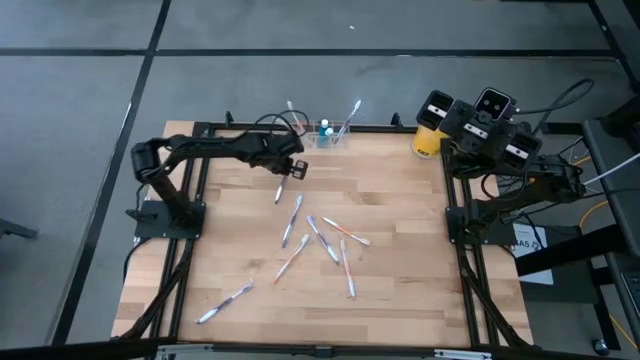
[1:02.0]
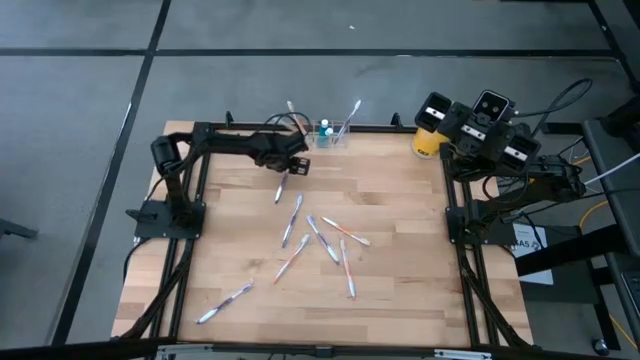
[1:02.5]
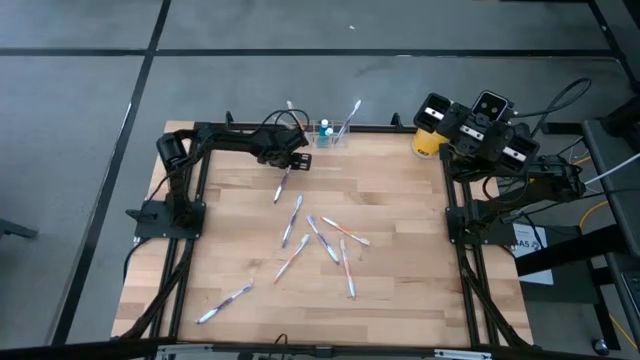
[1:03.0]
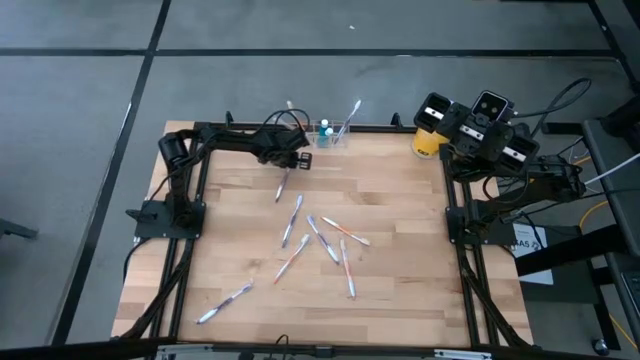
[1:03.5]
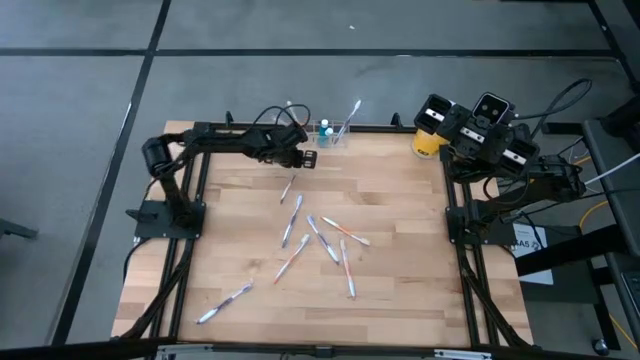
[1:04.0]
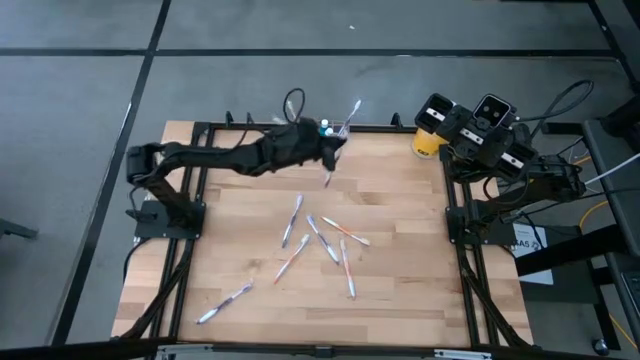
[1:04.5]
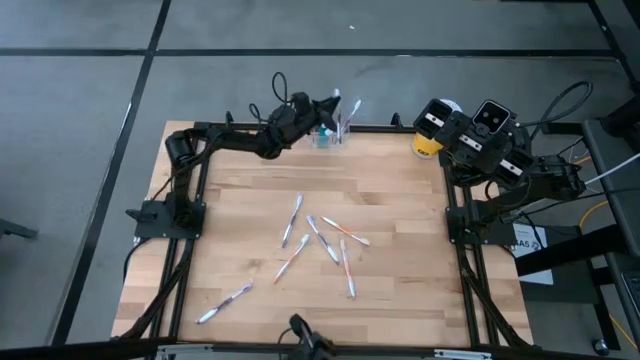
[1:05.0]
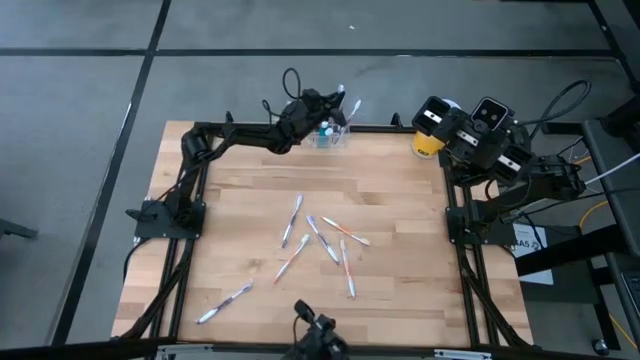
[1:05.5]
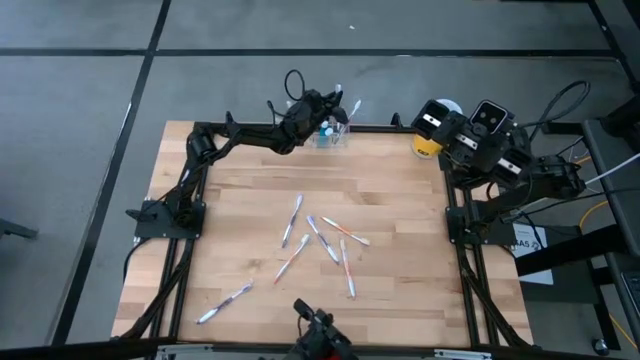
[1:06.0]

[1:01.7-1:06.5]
Task: Pick & Place toothbrushing station
Put the purple toothbrush into the transparent organizer

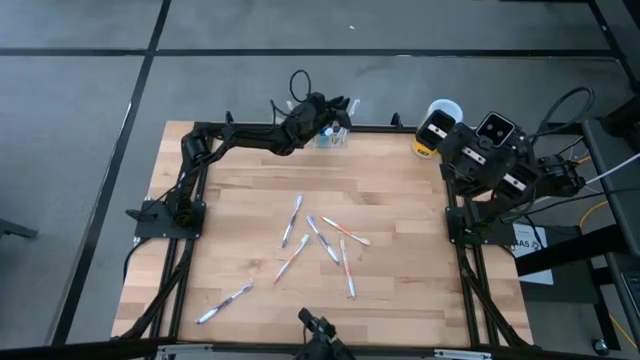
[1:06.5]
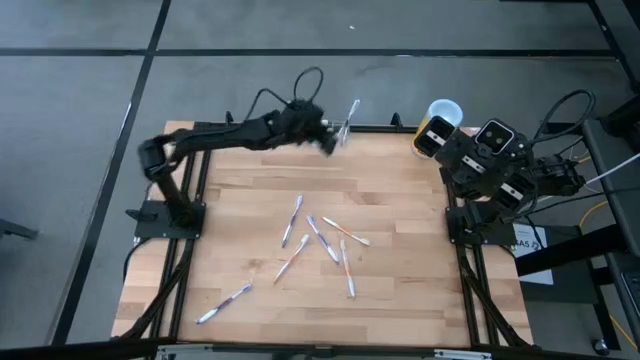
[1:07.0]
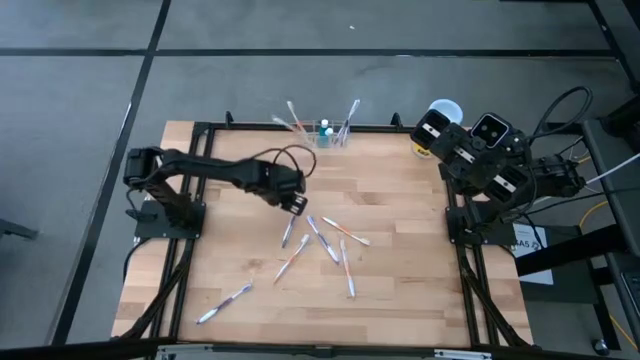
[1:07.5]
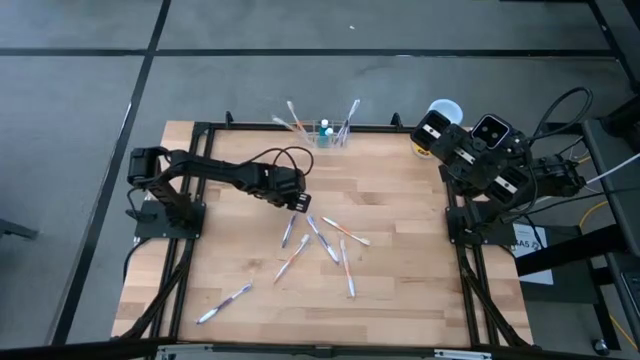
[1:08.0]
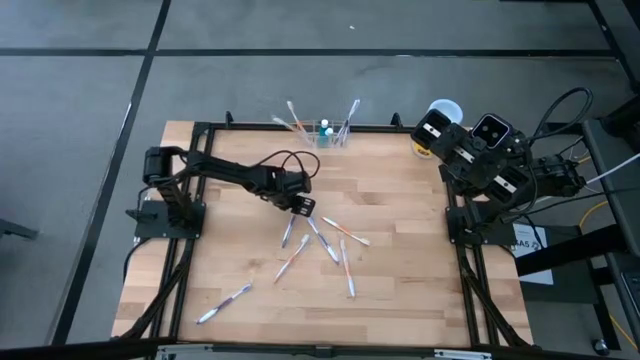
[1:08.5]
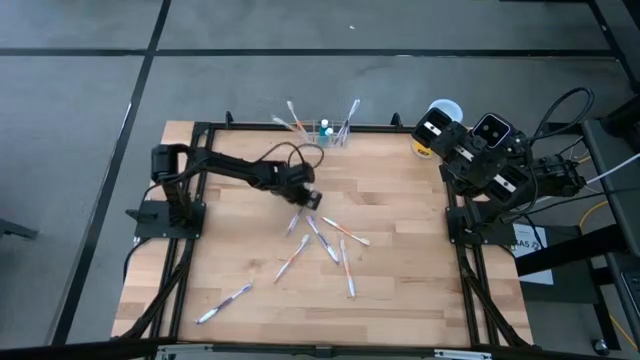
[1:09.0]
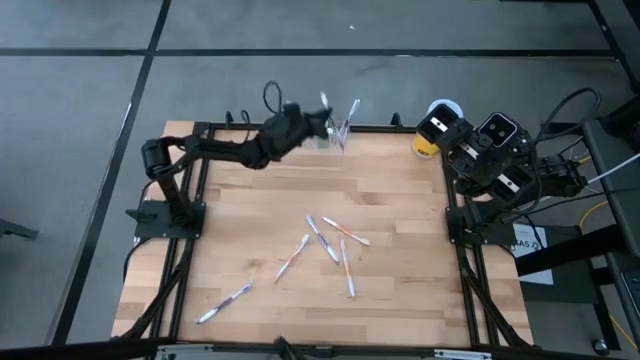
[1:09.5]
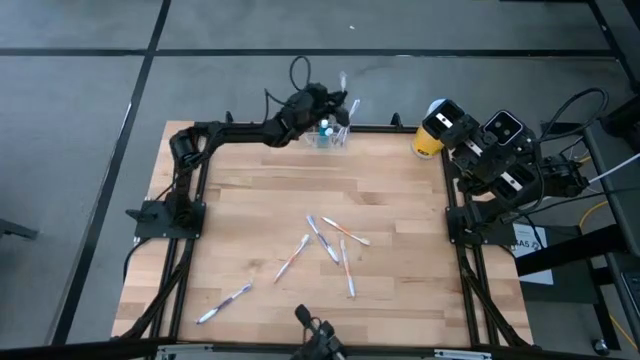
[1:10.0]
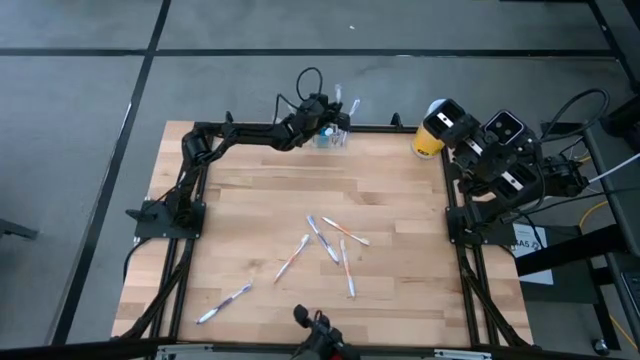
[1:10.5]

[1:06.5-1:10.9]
Put the purple toothbrush into the transparent organizer

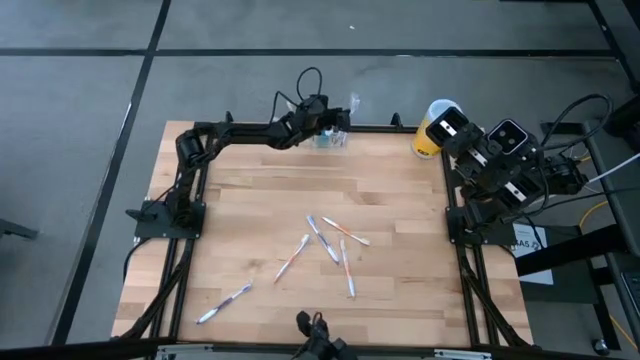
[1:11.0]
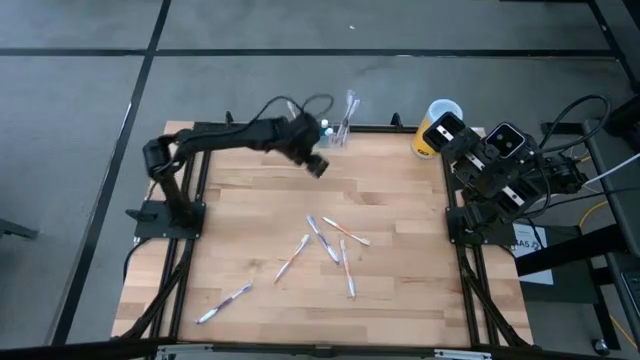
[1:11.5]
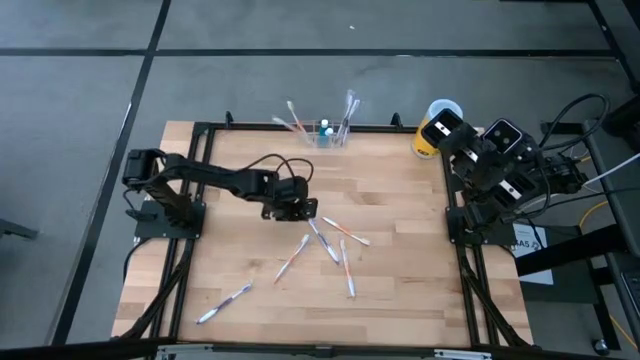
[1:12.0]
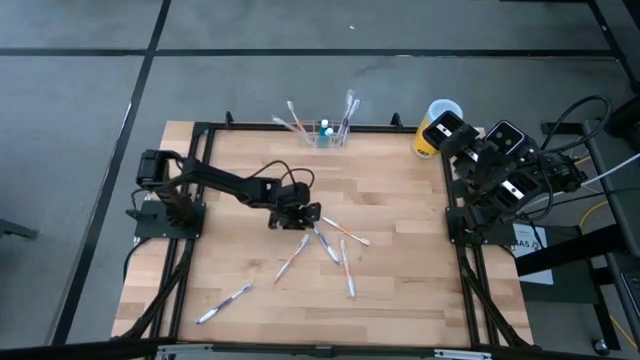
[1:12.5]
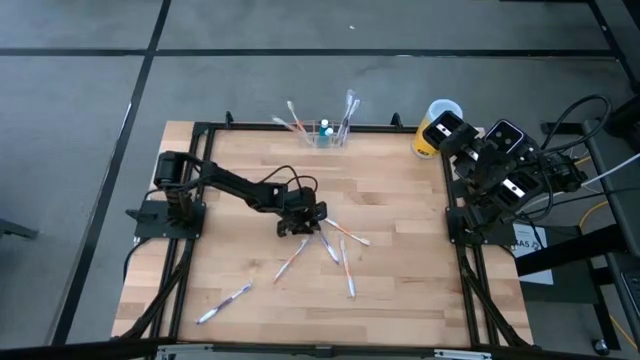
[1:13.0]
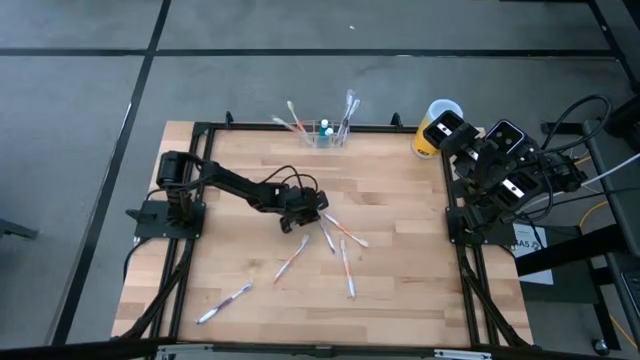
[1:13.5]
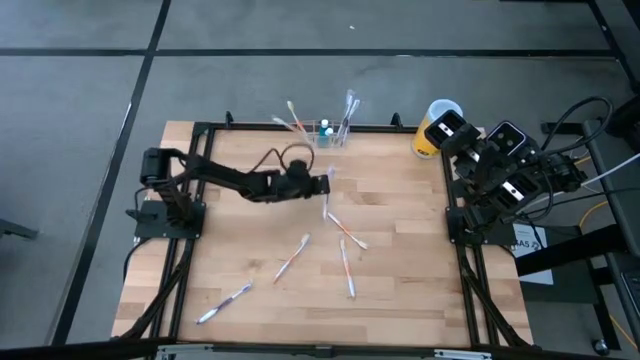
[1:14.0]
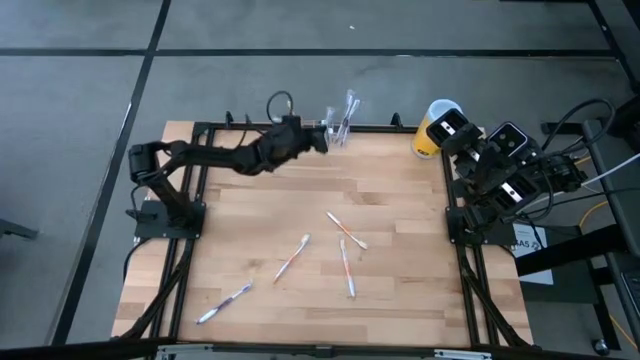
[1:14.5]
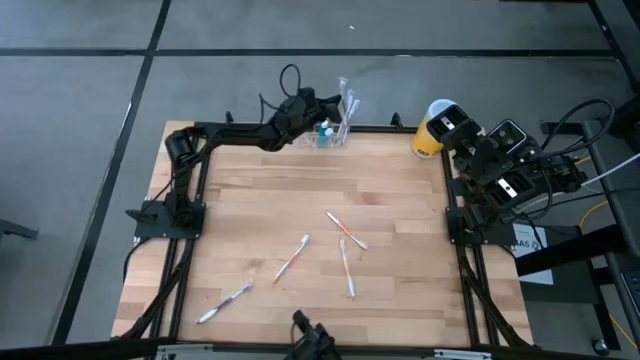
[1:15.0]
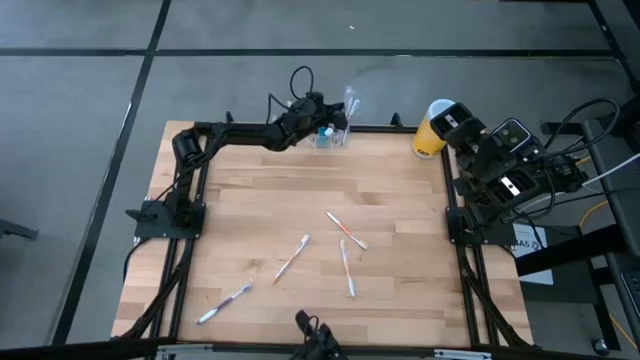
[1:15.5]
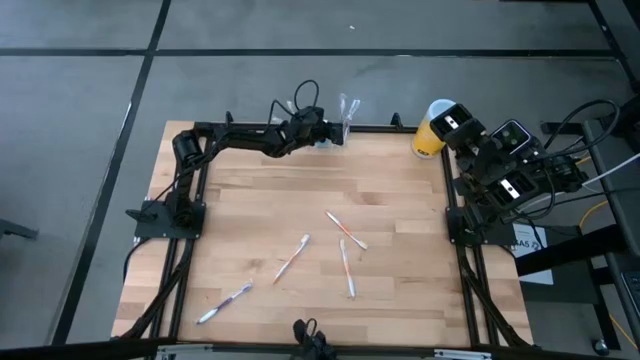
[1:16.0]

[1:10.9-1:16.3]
Put the purple toothbrush into the transparent organizer

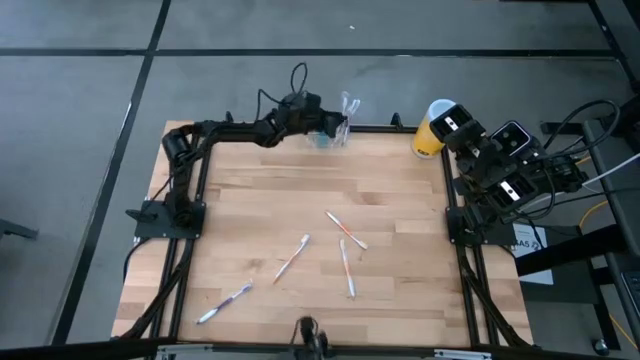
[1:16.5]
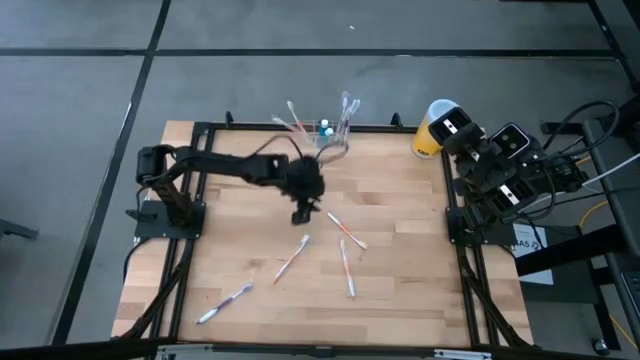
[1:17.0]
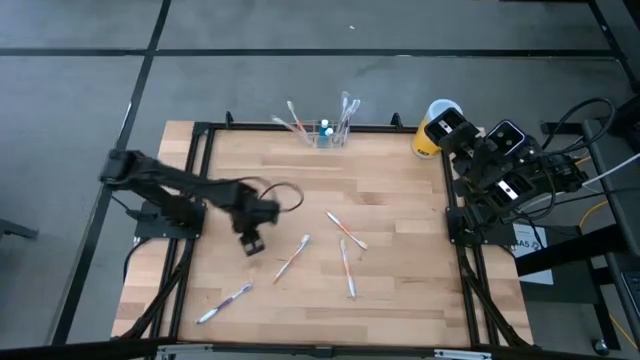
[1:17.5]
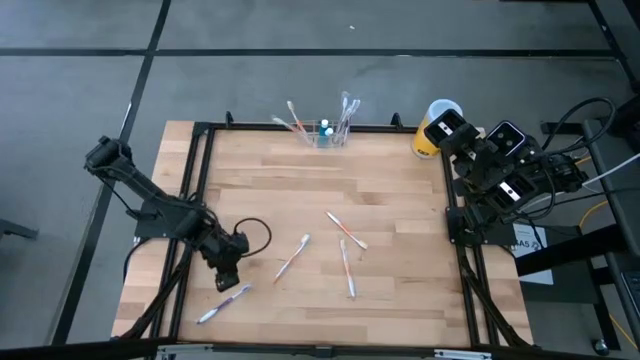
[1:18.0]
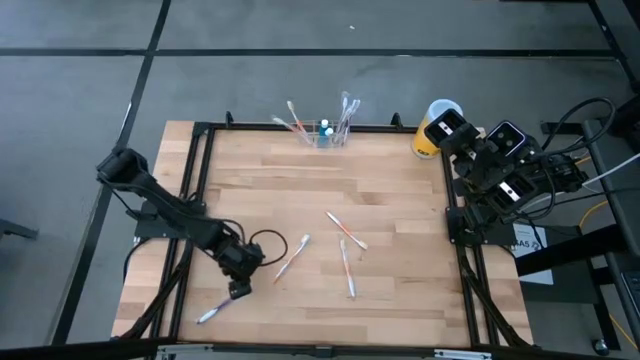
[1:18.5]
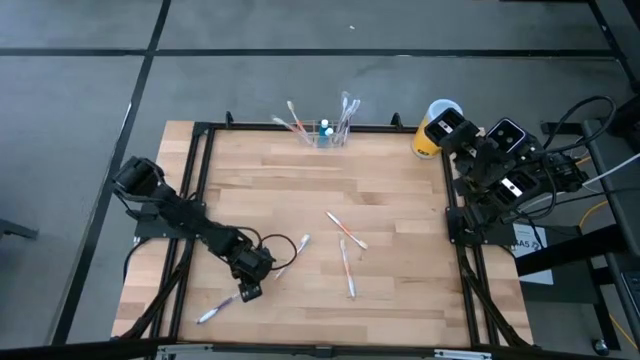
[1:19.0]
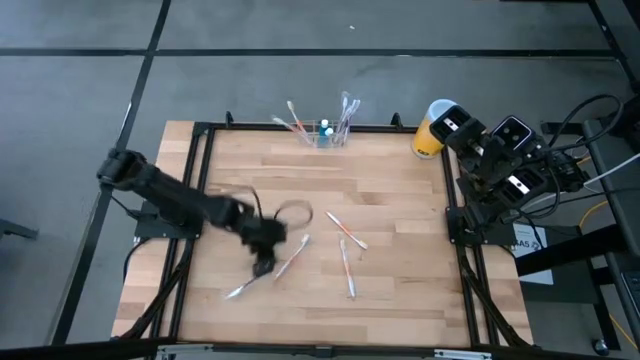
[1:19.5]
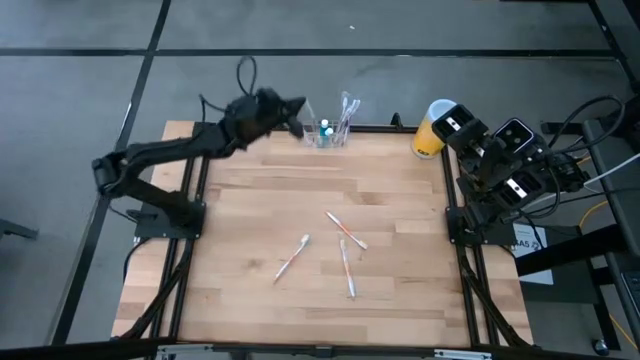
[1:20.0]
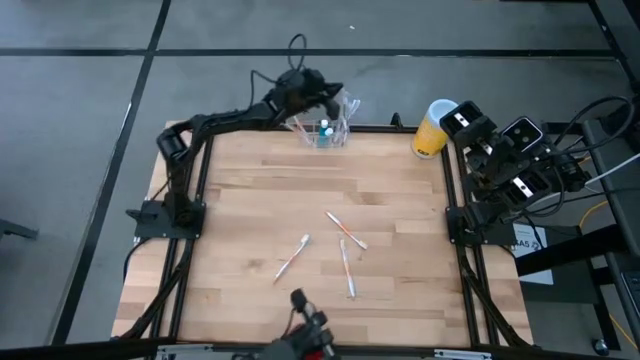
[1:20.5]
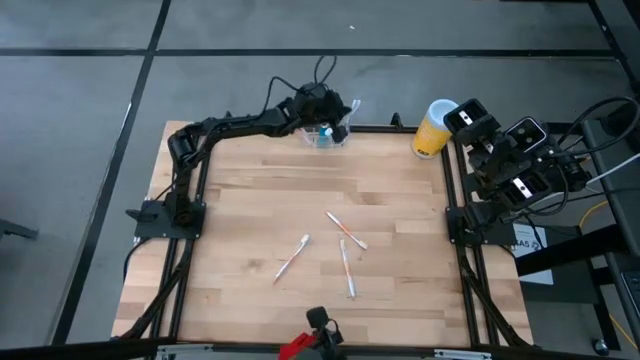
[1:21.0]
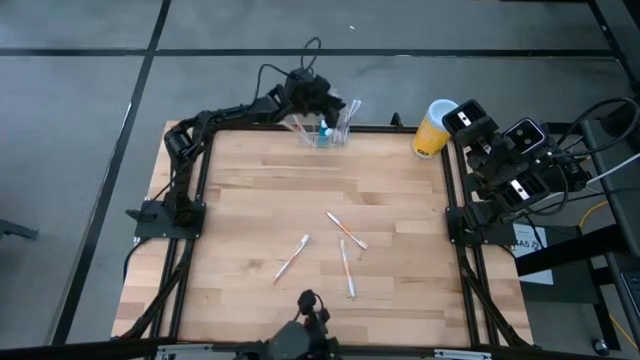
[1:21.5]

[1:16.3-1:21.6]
Put the purple toothbrush into the transparent organizer

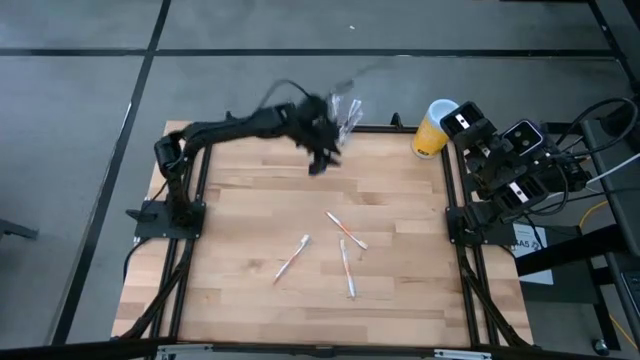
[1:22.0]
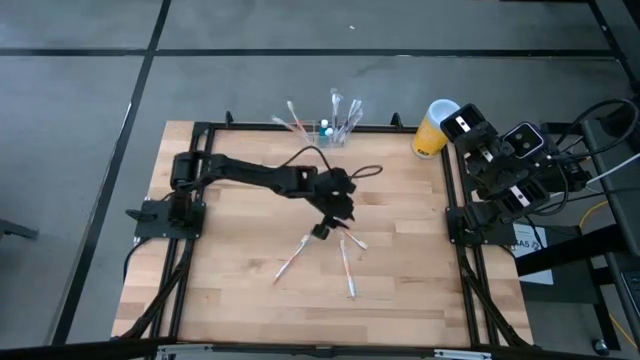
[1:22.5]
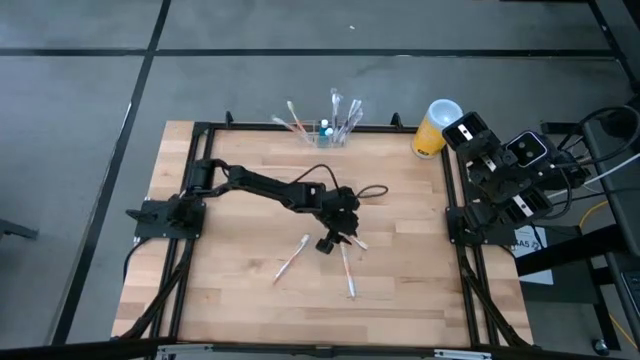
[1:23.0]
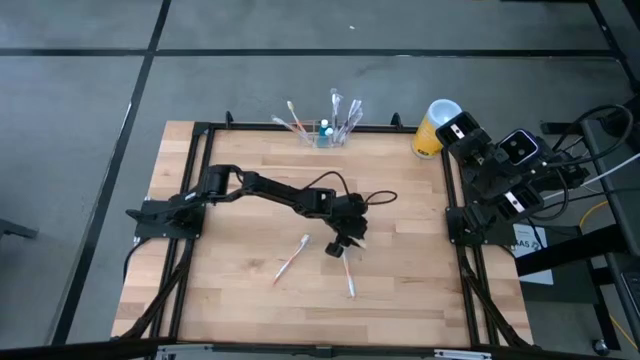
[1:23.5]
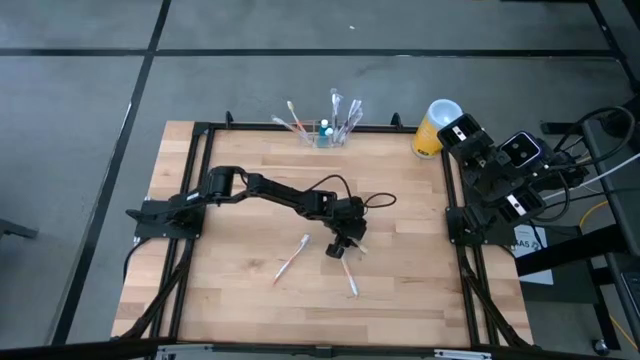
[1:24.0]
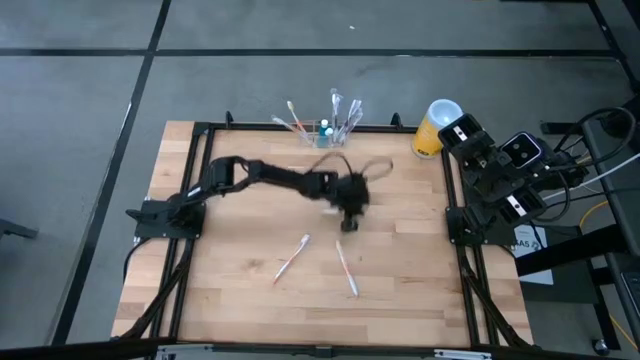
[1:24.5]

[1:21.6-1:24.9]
Put the orange toothbrush into the transparent organizer
